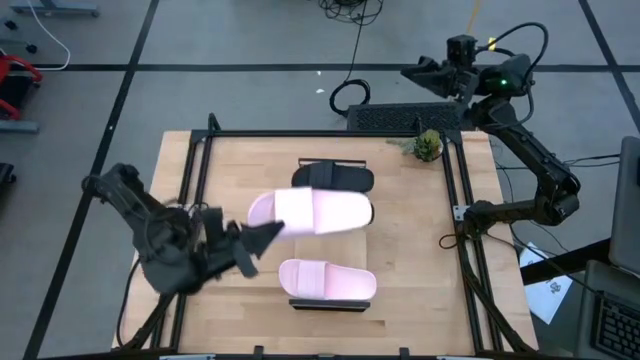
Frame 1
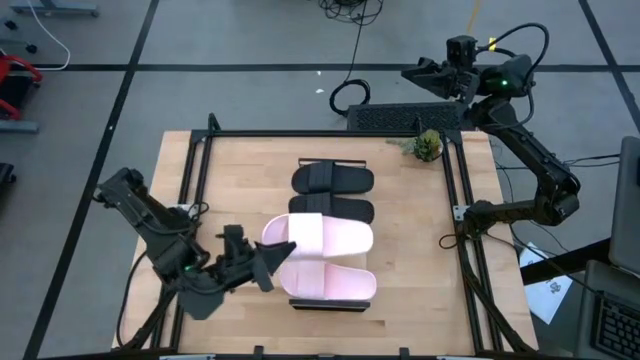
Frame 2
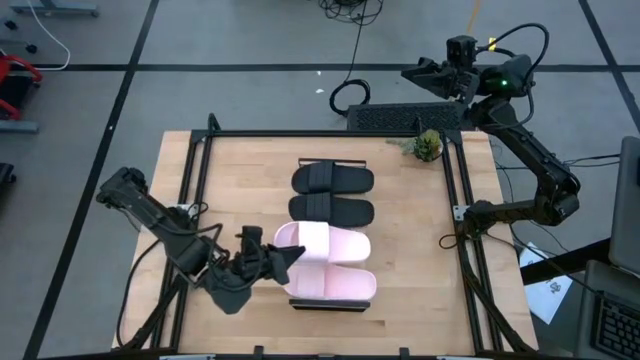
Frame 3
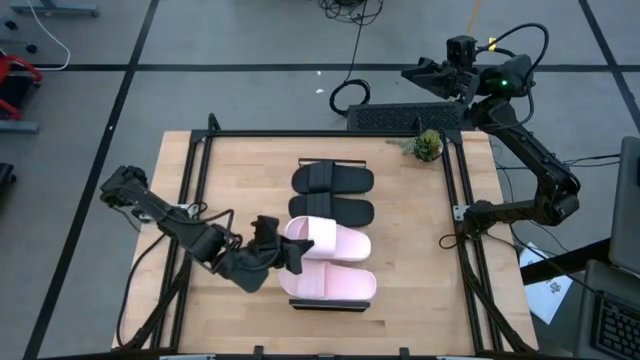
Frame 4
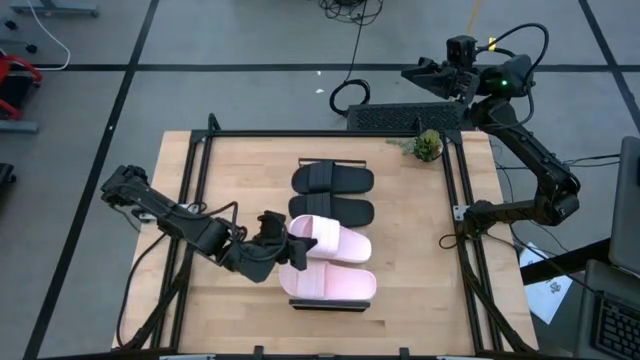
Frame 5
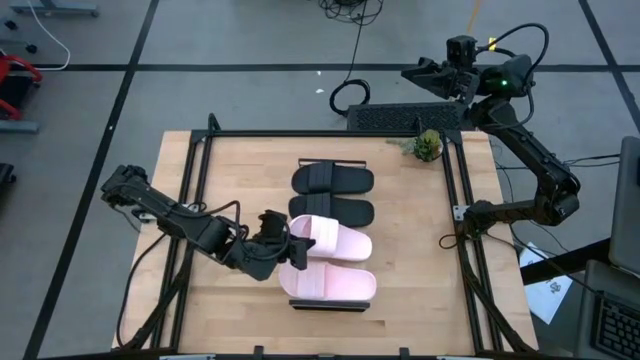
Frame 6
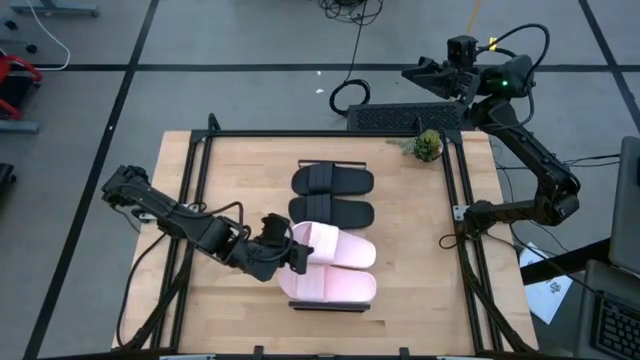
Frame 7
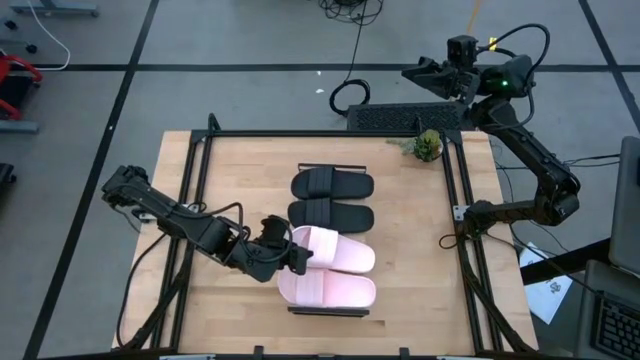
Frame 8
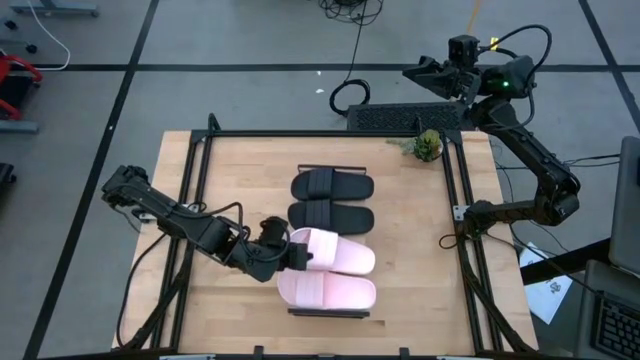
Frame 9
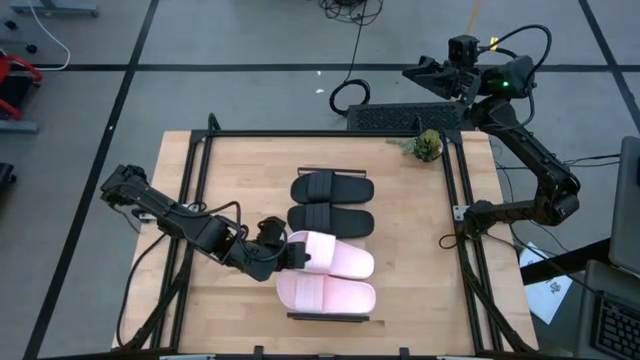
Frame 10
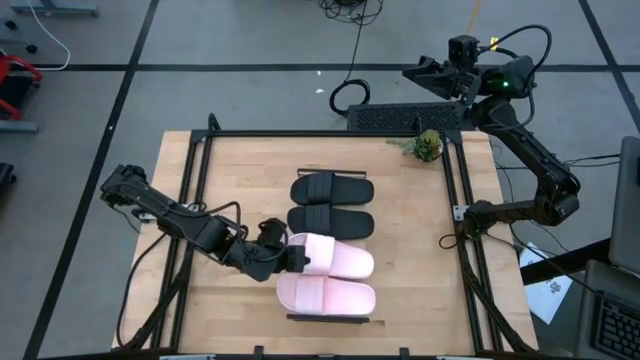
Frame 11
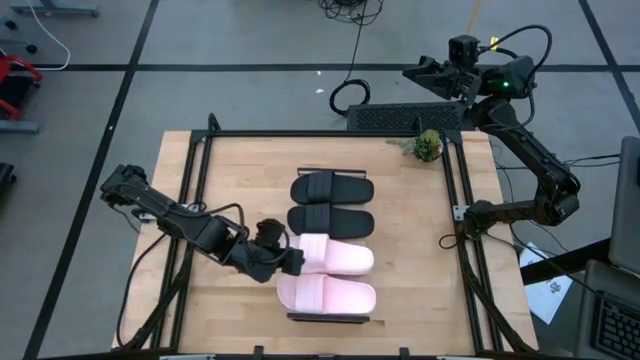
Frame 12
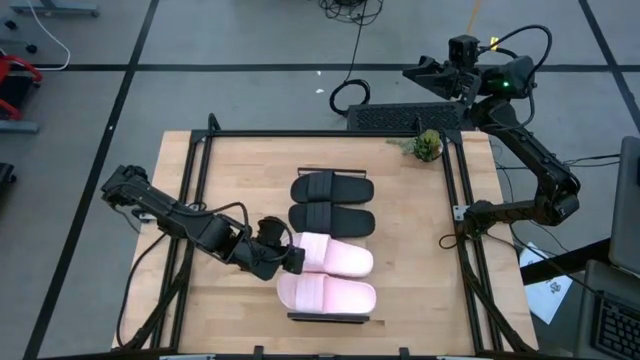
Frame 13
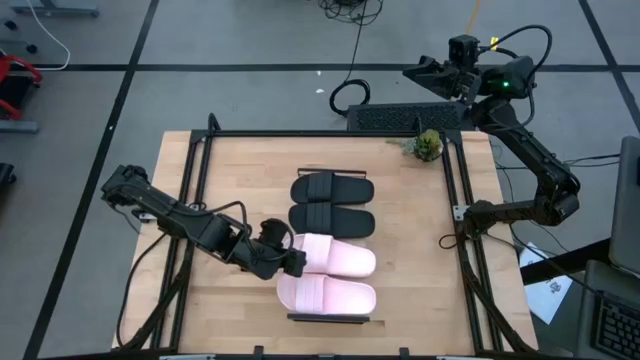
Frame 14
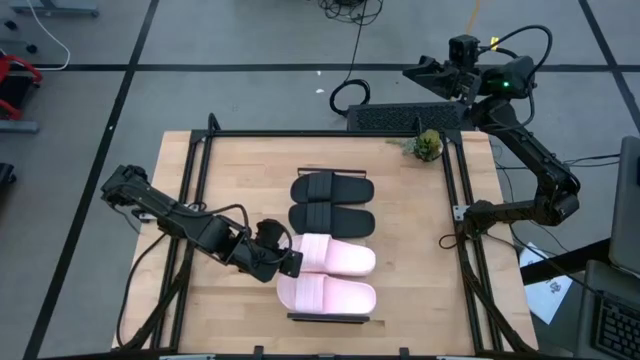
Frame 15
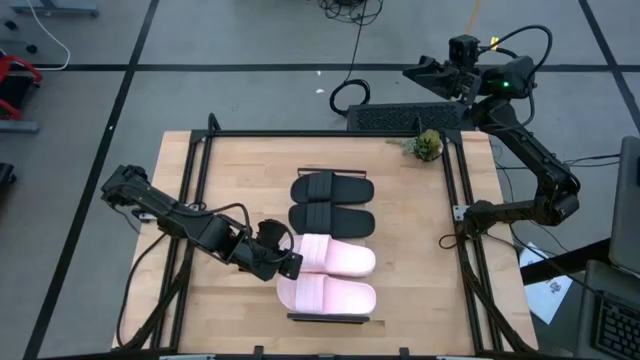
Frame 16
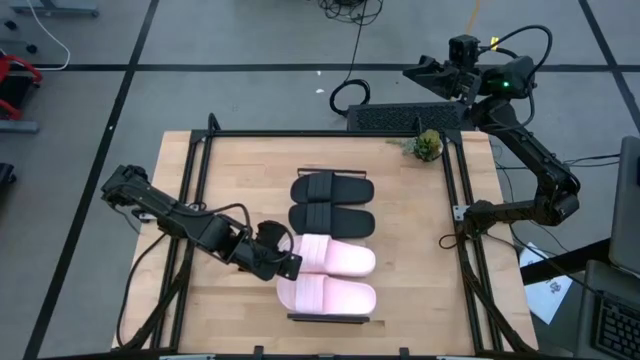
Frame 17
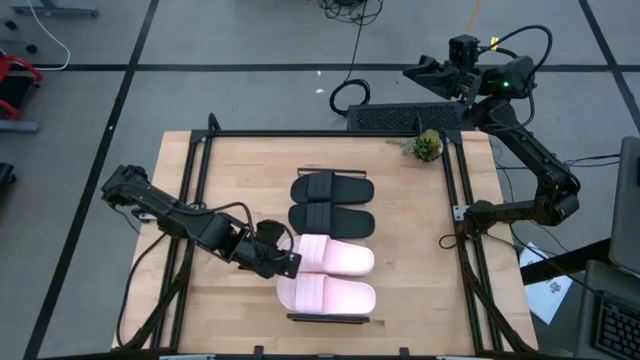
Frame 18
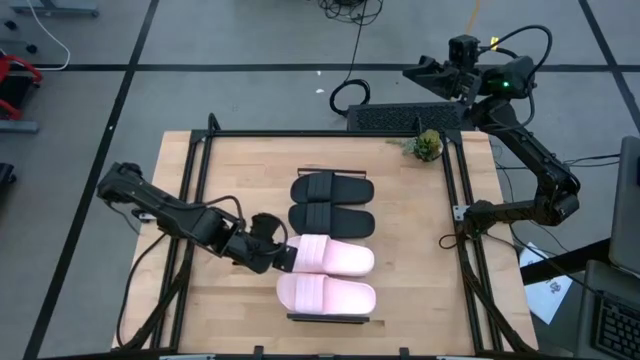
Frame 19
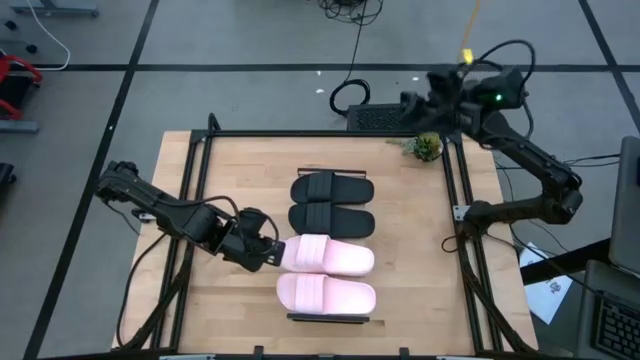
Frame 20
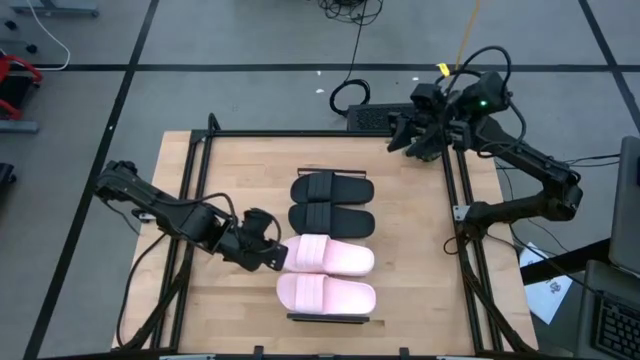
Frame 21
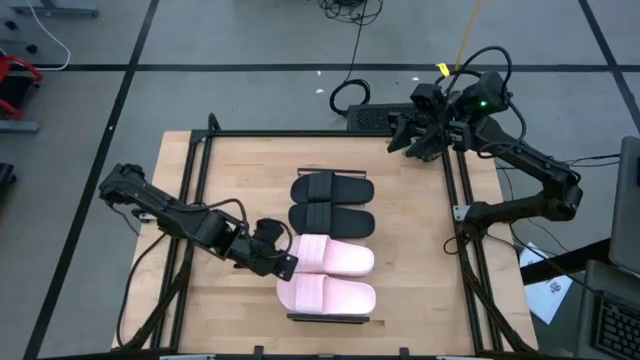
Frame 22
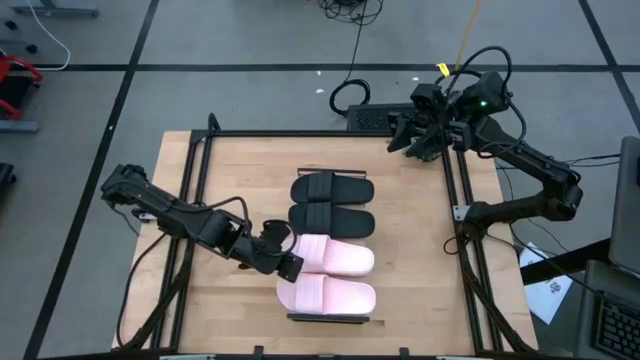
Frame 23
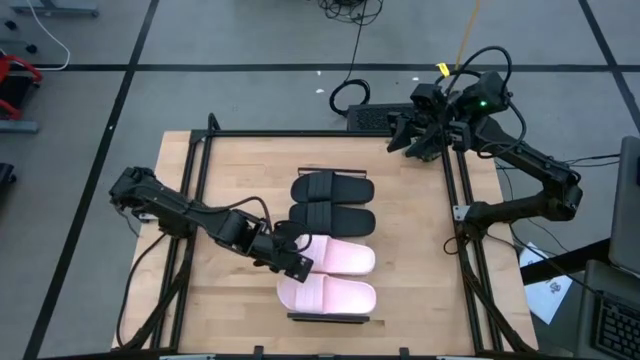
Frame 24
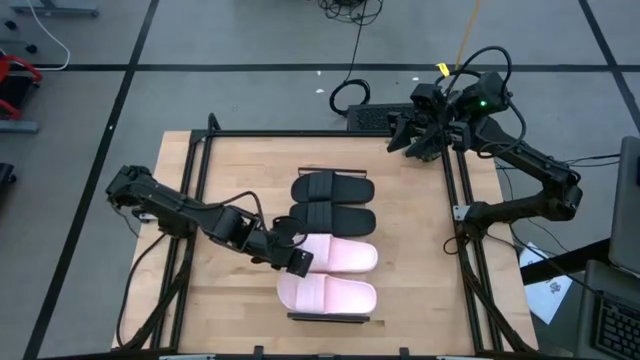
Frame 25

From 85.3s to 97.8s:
Task: Pick and place slides into the shelf
Put the pink slide on the shelf

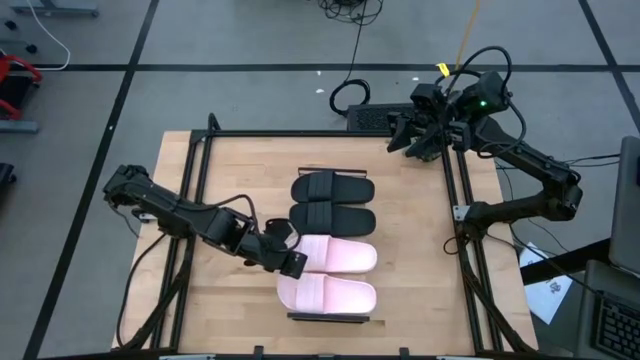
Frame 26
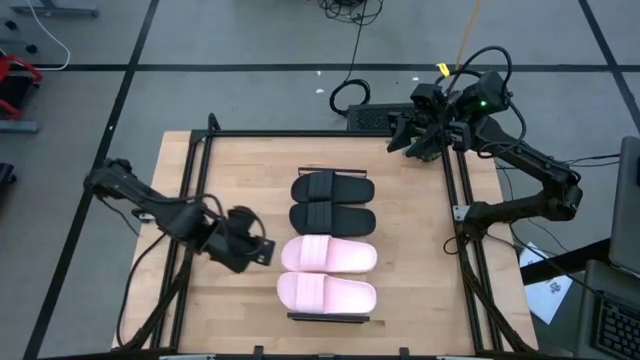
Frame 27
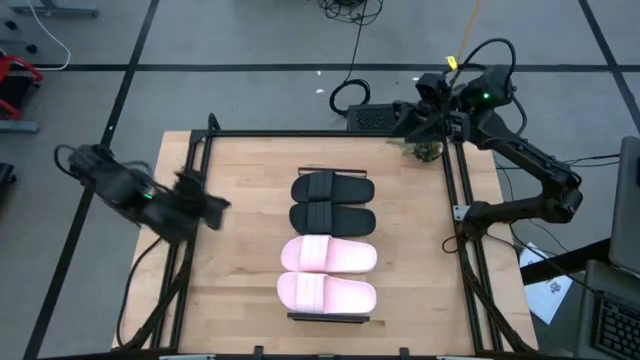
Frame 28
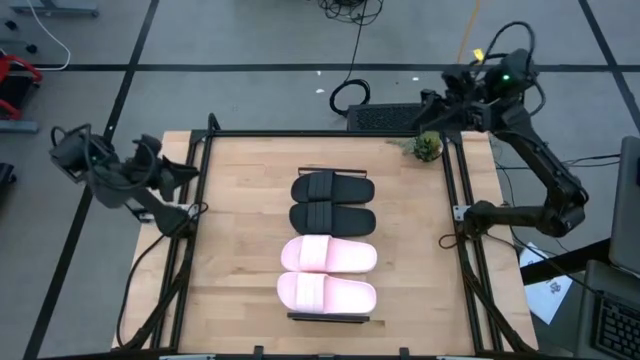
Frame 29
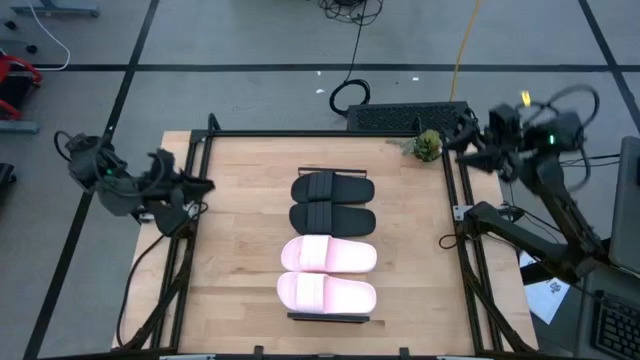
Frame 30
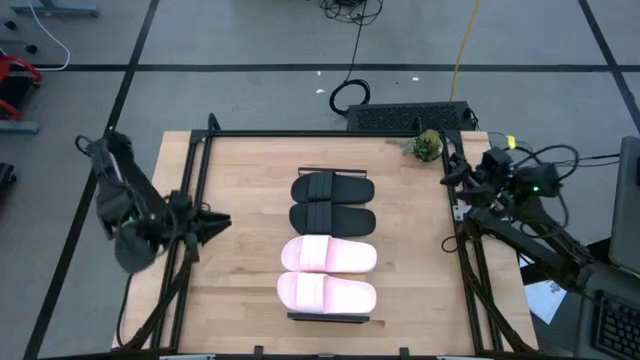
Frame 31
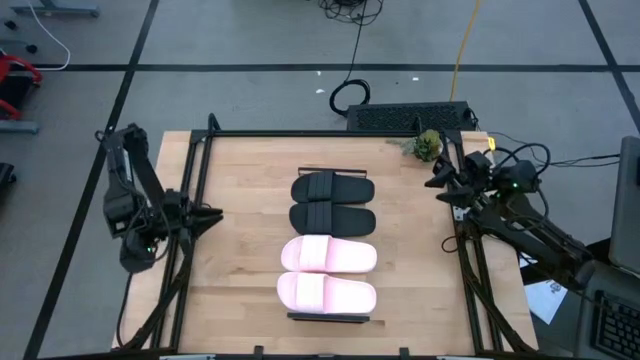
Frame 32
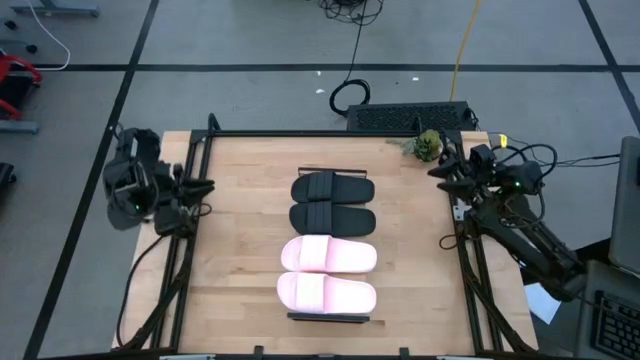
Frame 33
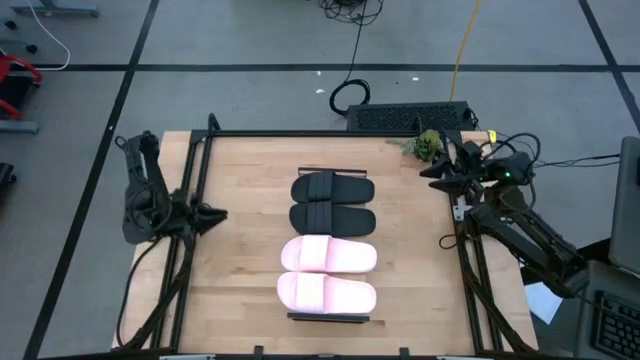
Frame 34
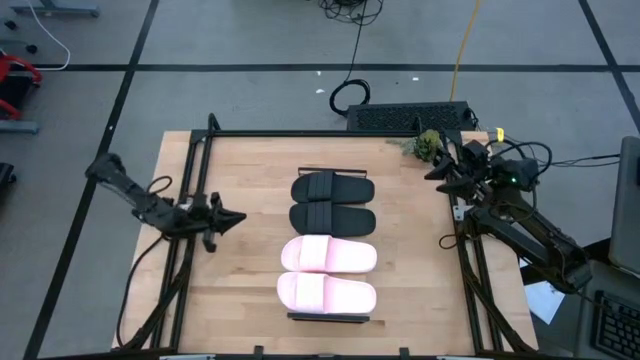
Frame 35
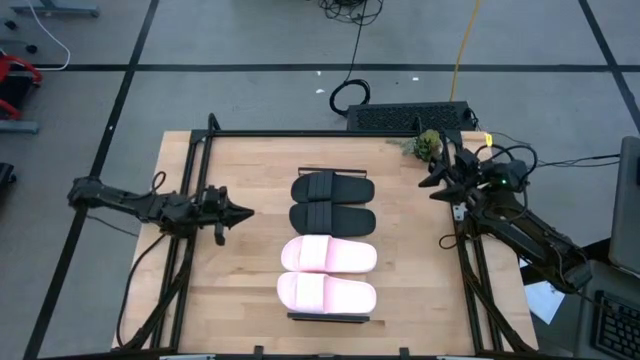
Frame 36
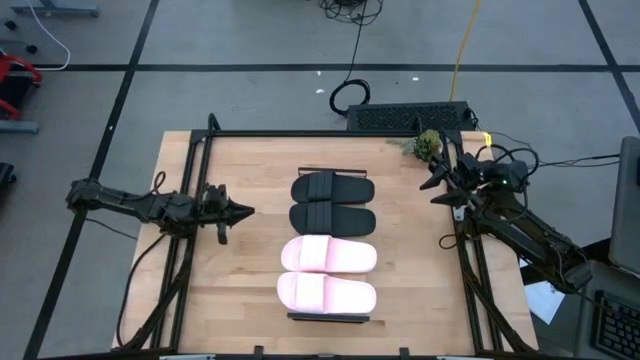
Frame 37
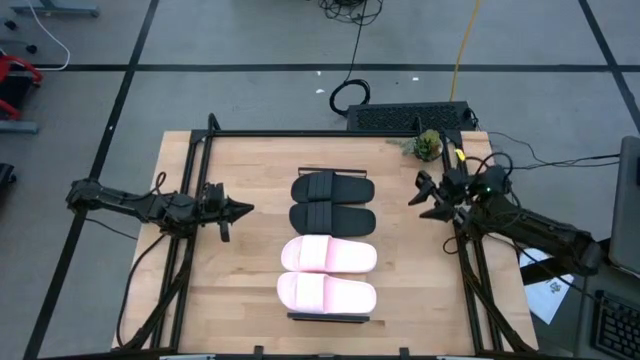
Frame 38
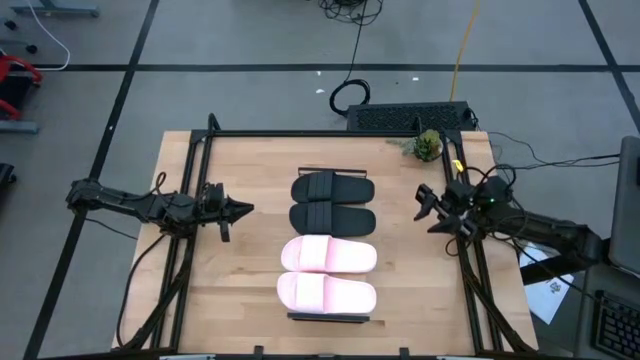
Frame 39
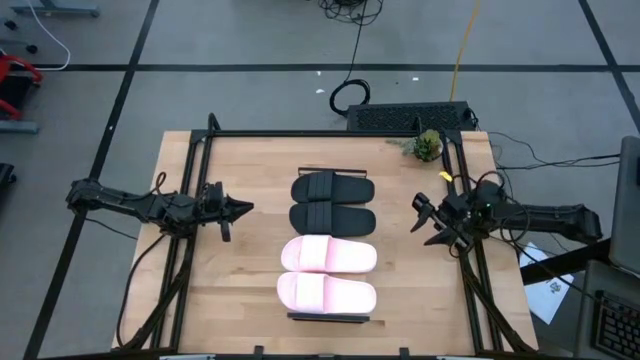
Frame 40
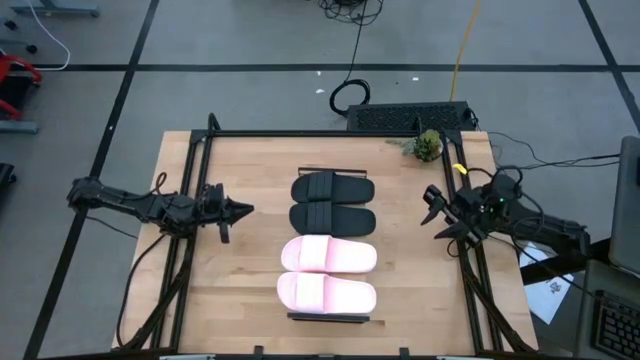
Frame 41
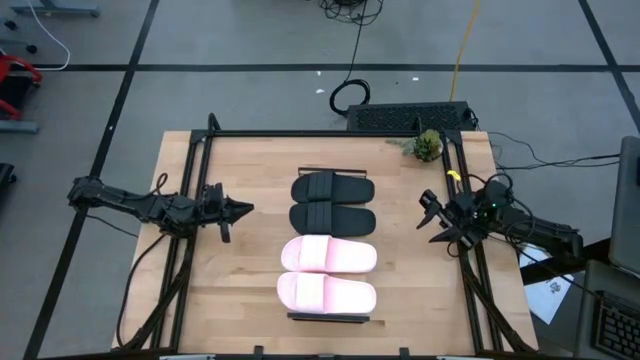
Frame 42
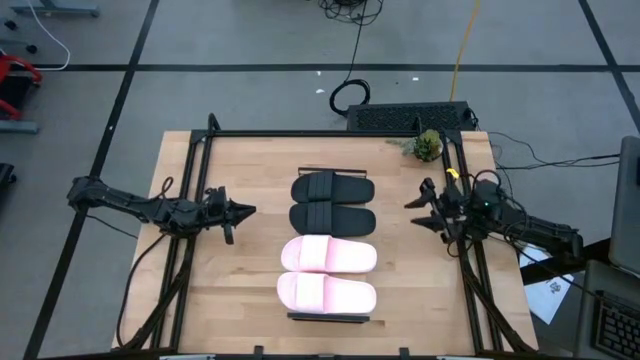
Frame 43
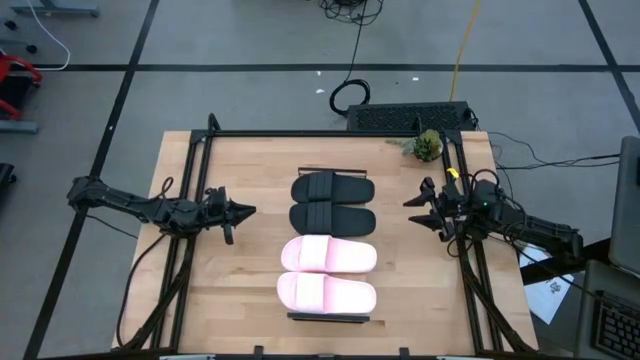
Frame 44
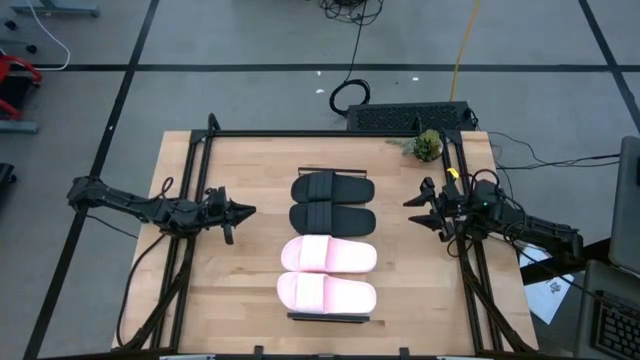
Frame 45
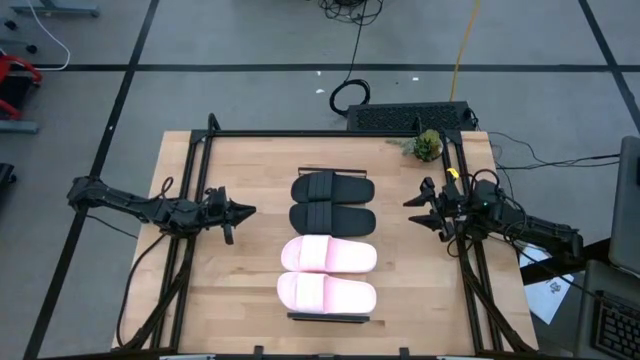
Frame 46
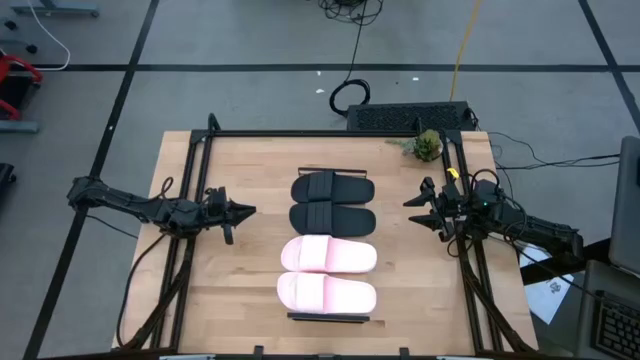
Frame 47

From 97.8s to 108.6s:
Return to Home Position
